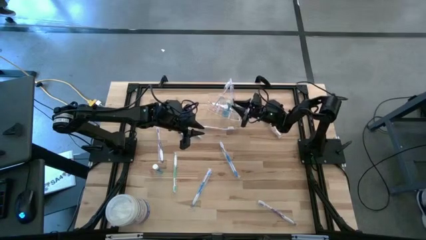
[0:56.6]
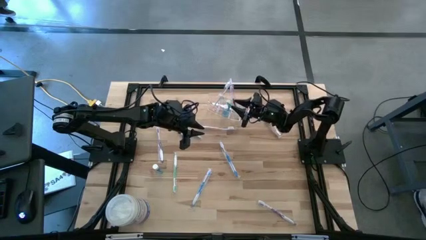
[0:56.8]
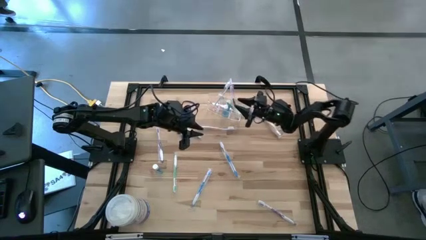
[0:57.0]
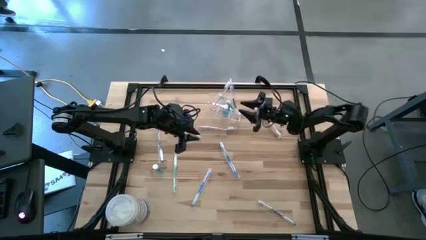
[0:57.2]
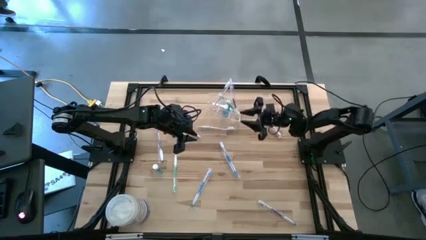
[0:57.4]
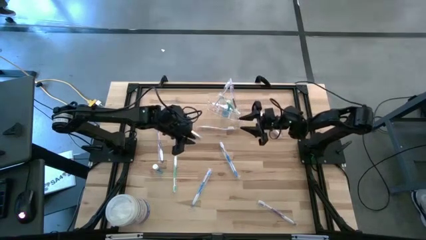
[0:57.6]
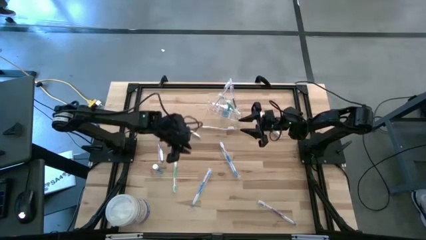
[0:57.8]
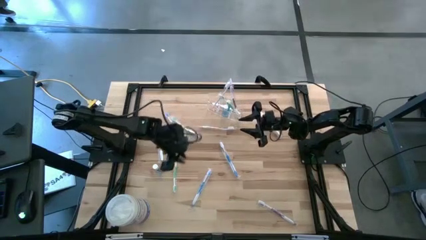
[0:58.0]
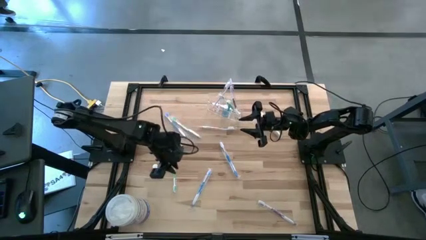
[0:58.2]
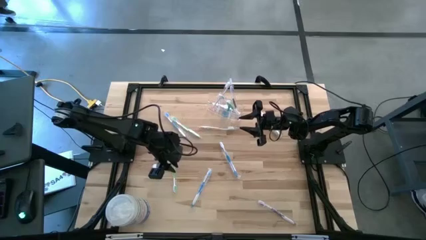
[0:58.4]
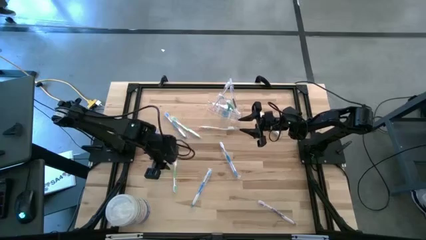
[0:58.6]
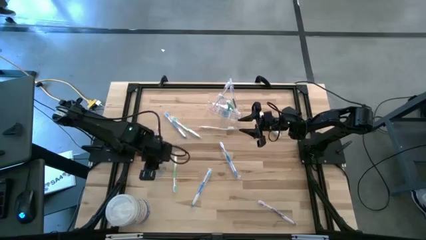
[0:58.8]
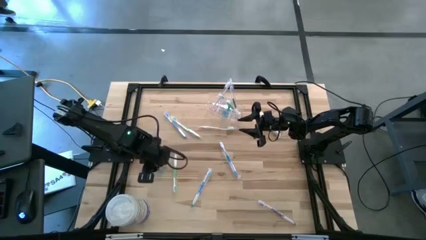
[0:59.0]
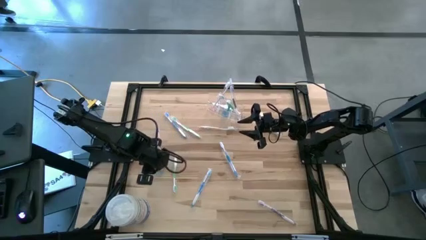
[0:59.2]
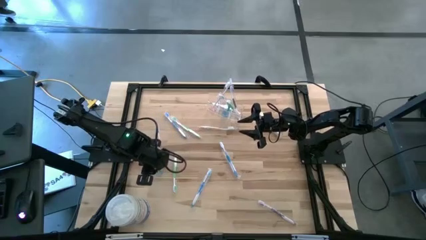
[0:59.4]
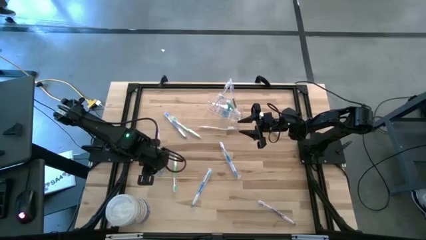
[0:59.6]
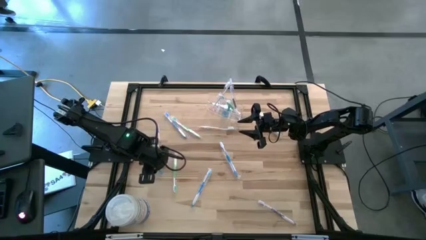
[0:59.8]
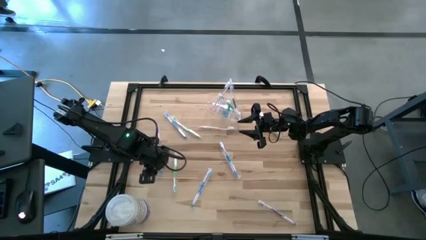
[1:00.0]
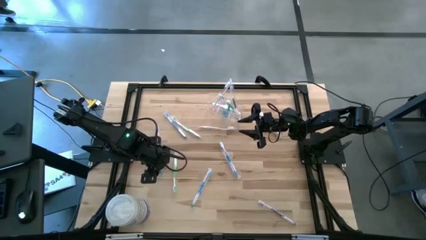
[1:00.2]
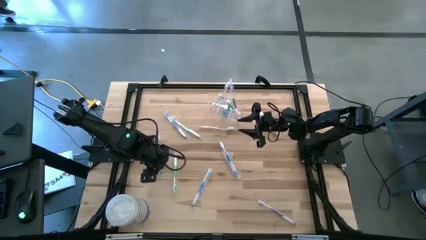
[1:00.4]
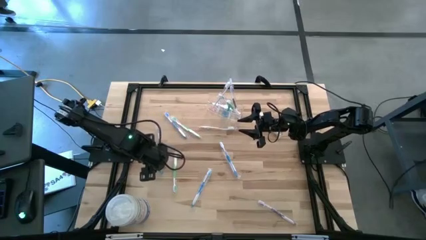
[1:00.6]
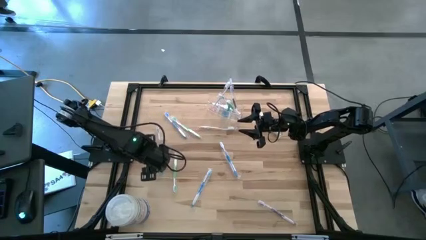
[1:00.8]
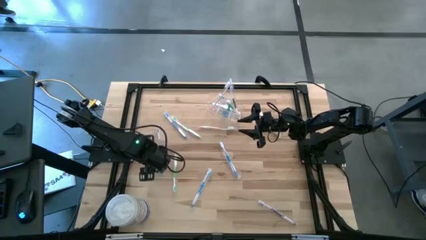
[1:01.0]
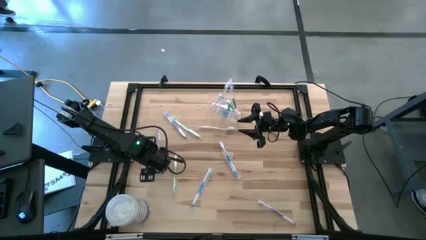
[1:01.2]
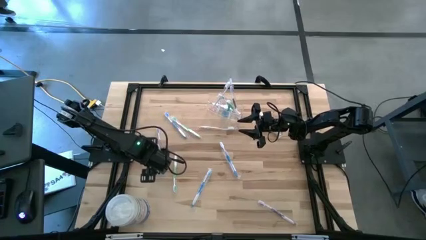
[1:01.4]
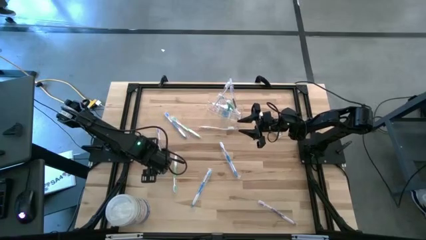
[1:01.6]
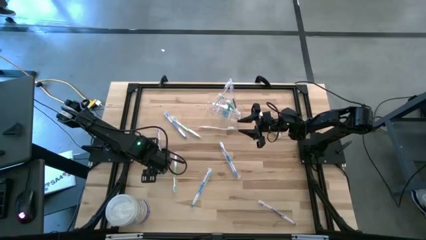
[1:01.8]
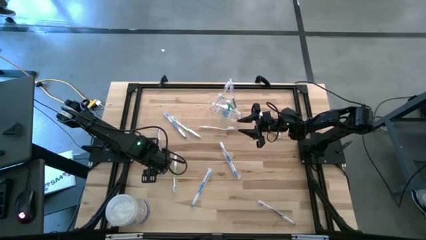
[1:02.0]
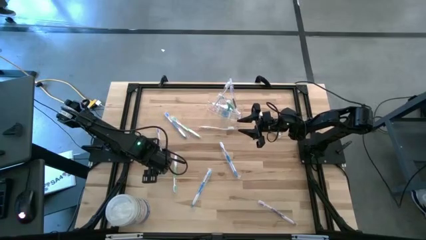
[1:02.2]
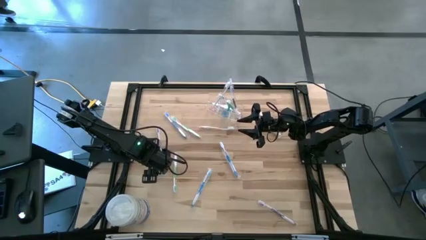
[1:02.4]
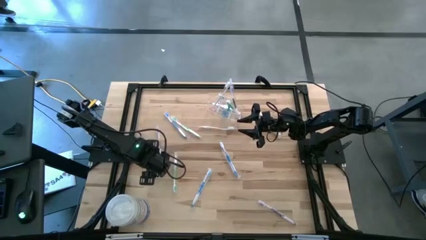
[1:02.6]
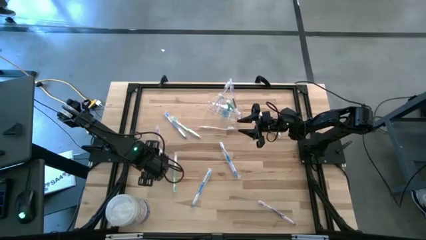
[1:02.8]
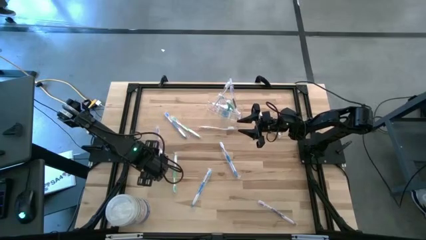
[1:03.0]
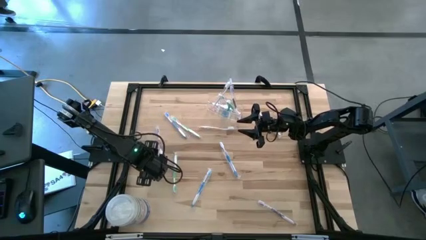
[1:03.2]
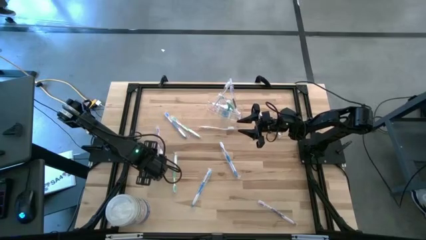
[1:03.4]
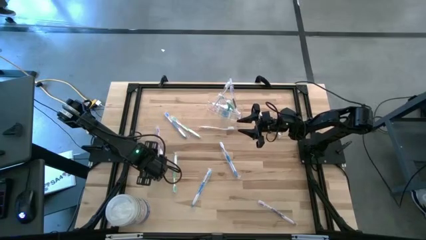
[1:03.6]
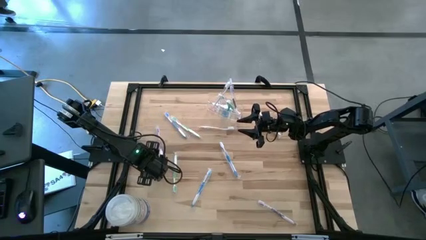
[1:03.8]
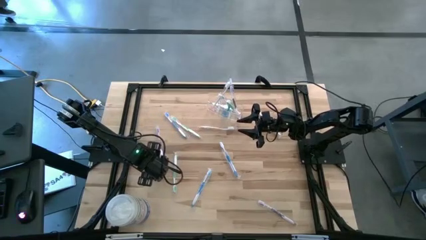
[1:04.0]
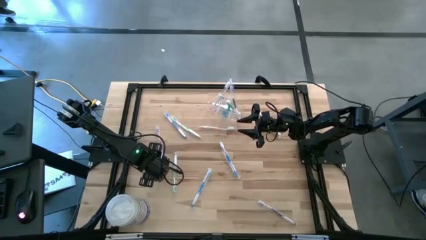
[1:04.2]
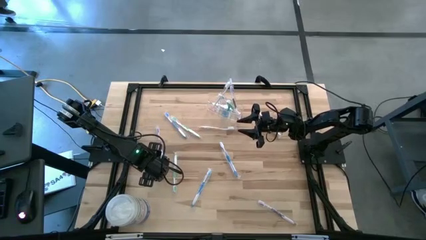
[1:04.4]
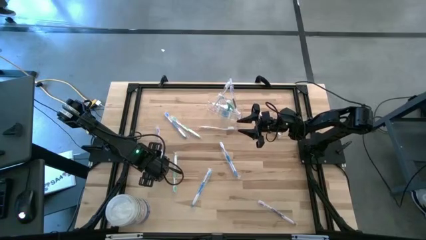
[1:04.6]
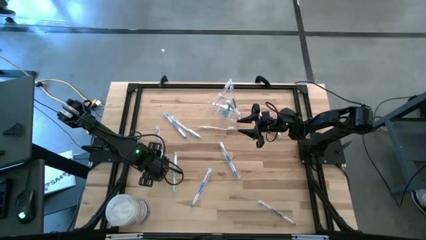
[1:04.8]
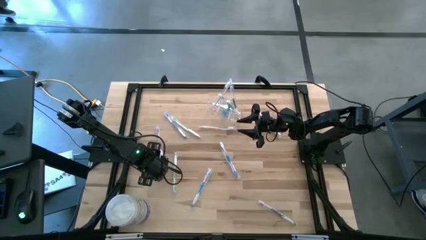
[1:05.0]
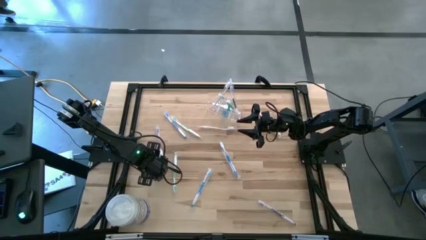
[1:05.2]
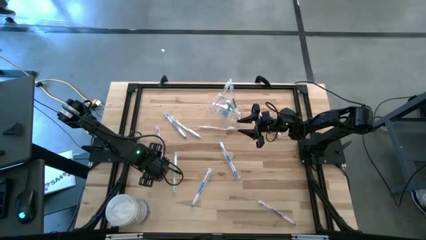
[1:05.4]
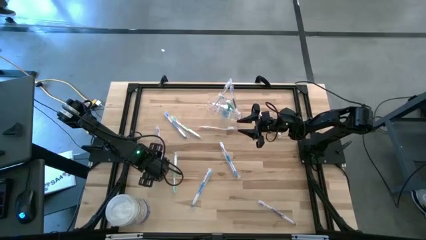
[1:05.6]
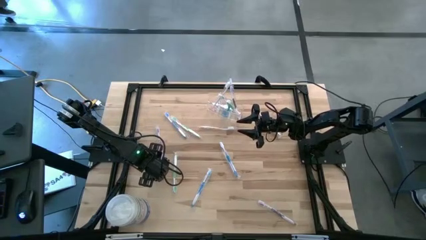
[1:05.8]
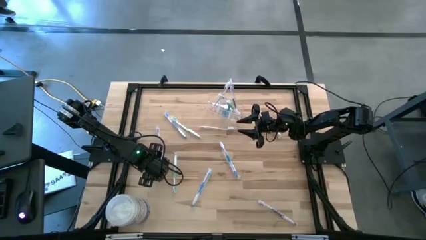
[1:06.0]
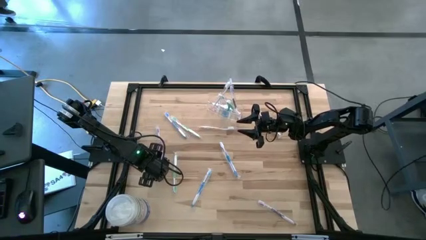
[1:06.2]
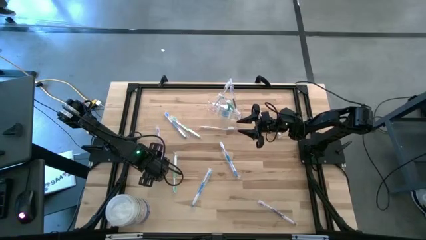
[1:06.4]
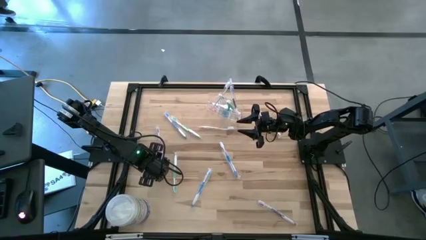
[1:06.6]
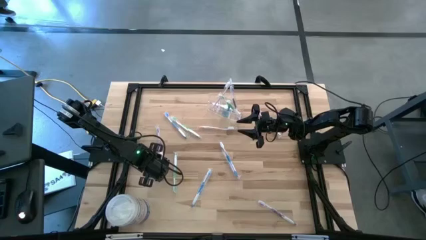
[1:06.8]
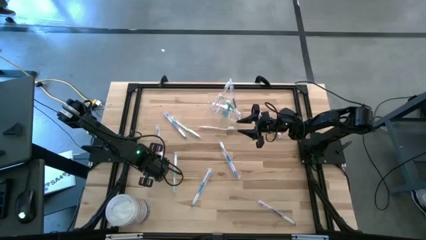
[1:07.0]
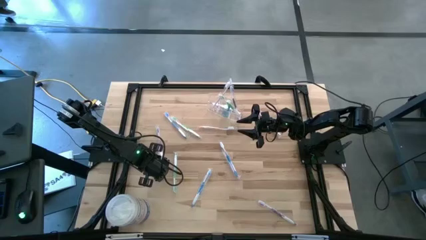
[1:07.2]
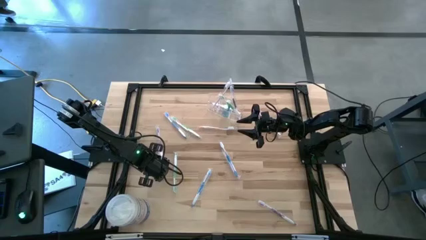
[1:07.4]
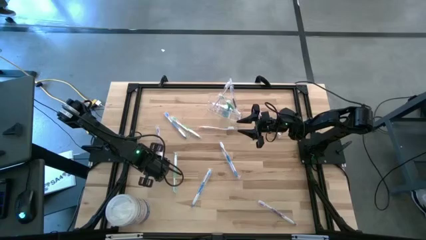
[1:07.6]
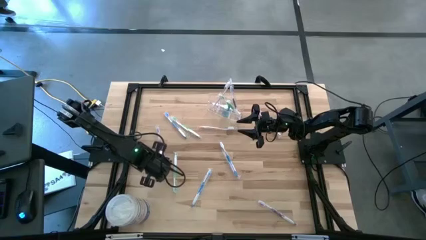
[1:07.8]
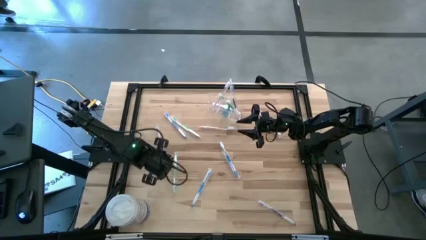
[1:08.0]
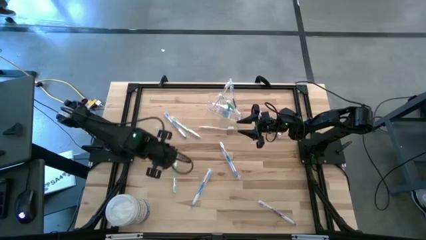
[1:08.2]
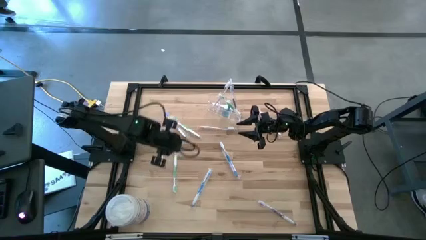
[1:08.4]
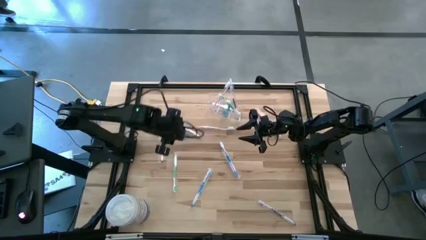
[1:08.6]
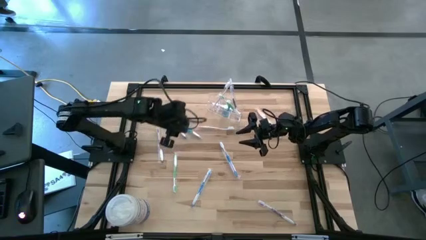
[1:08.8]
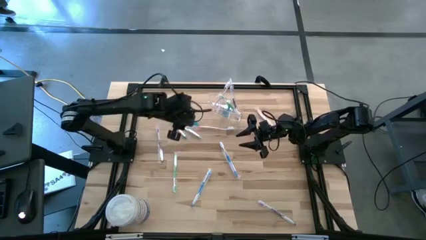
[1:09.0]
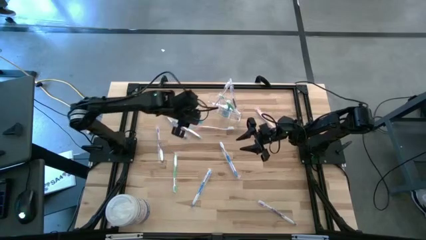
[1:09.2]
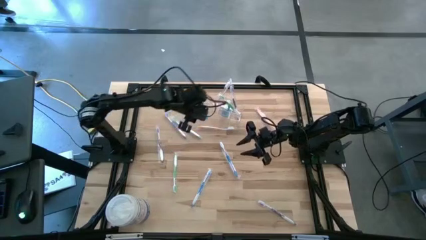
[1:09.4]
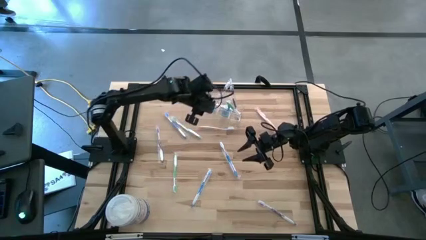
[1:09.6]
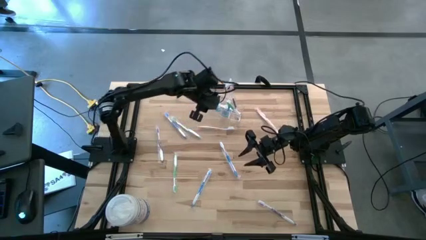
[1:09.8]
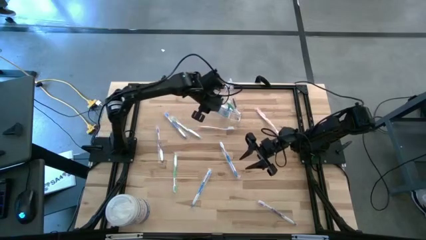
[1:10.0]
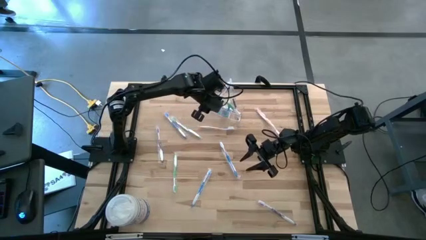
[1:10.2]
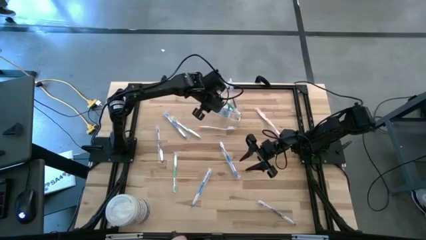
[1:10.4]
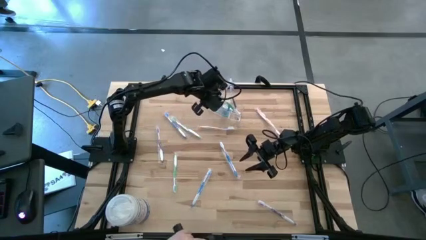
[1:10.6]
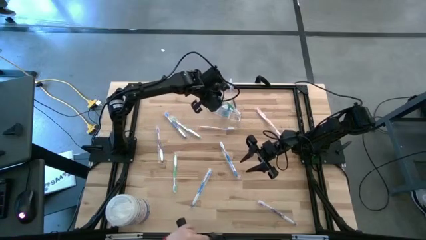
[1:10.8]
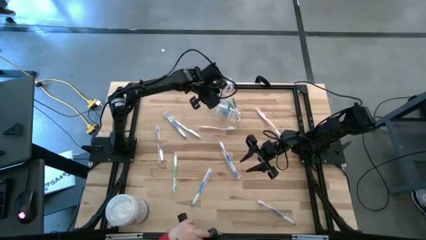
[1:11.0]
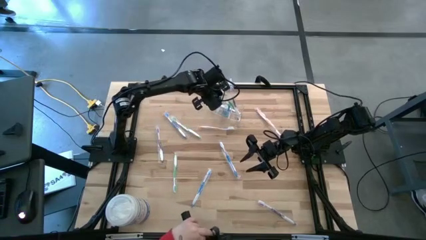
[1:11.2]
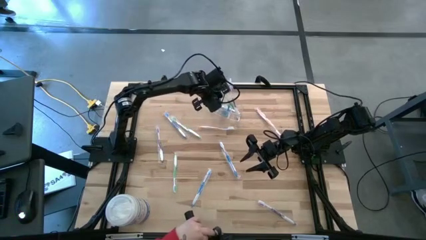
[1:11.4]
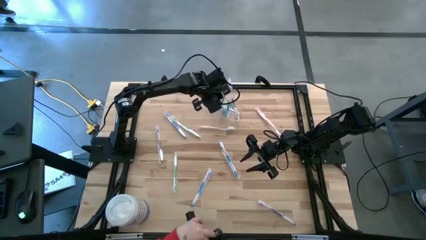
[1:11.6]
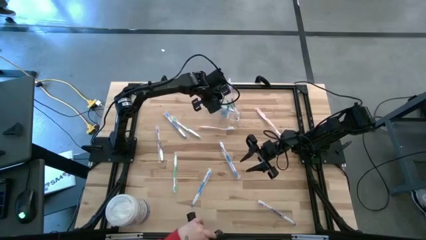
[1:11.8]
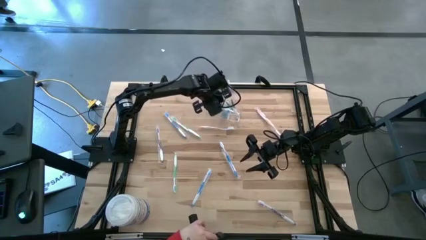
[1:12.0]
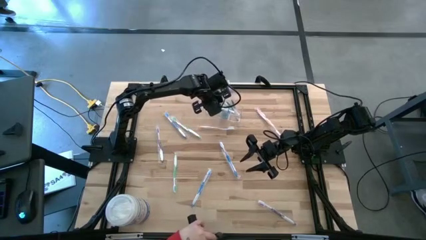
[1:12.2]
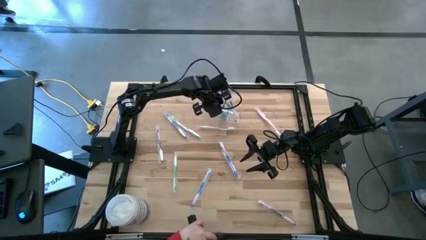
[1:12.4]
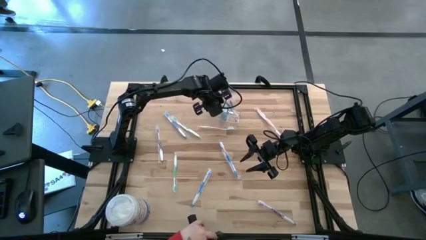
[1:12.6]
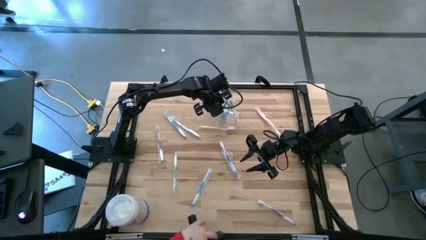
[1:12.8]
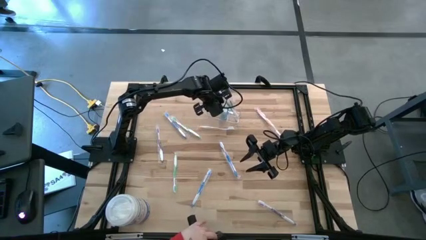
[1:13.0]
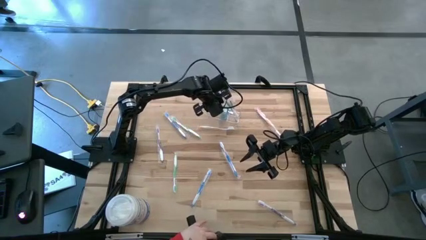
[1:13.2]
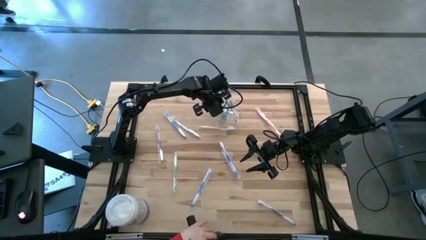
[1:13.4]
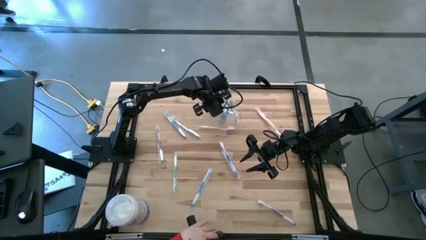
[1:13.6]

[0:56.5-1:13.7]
Task: Pick & Place toothbrushing station
Put the blue mouthwash into the transparent organizer
